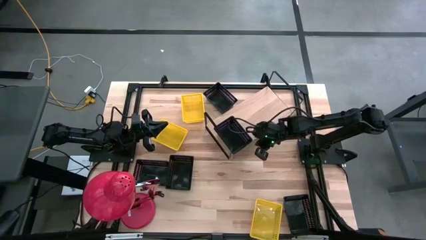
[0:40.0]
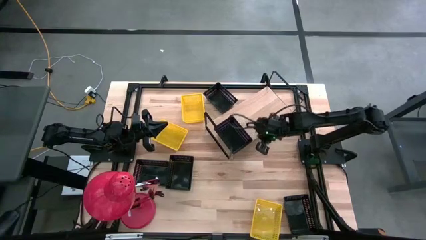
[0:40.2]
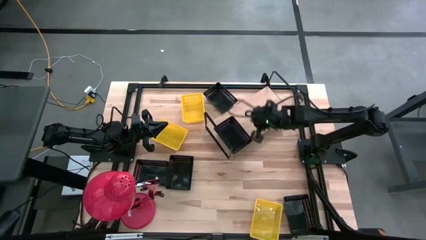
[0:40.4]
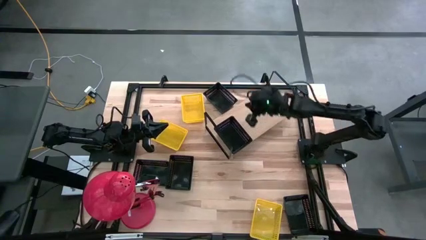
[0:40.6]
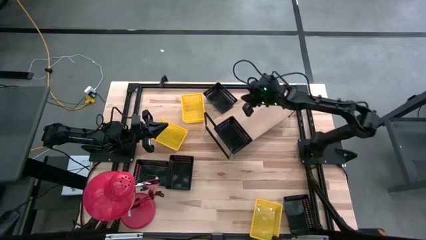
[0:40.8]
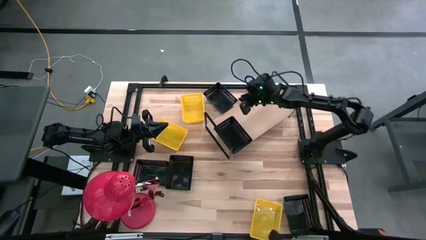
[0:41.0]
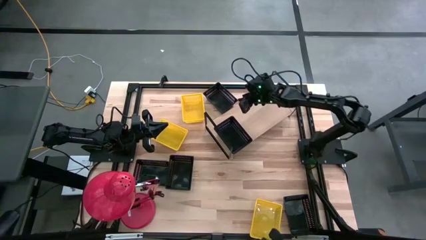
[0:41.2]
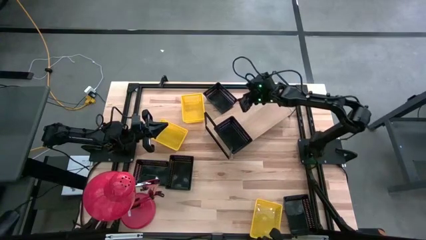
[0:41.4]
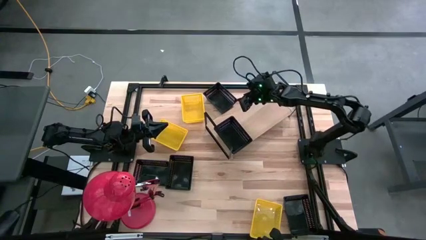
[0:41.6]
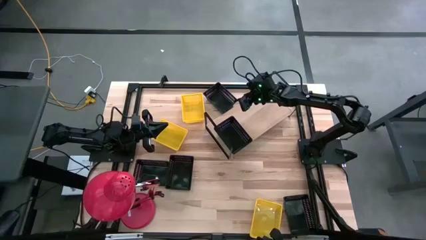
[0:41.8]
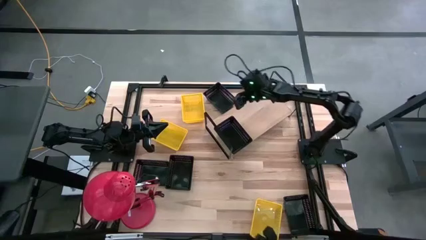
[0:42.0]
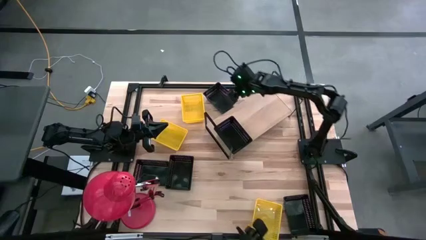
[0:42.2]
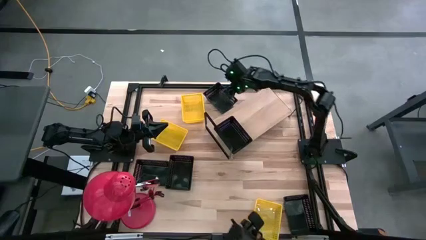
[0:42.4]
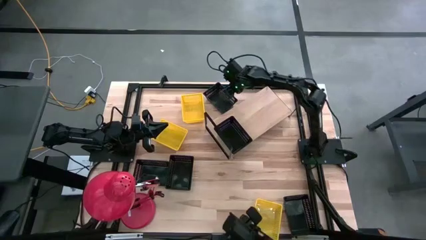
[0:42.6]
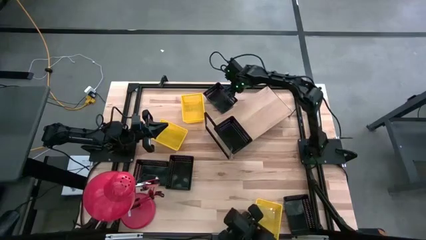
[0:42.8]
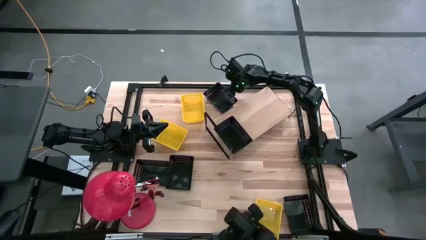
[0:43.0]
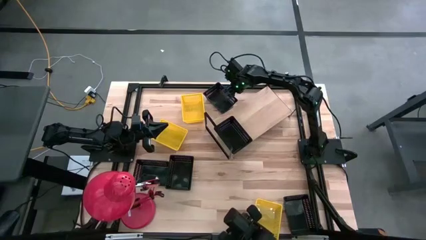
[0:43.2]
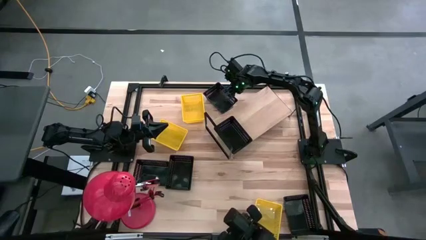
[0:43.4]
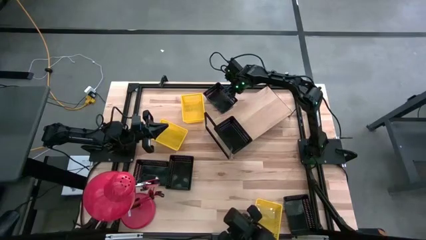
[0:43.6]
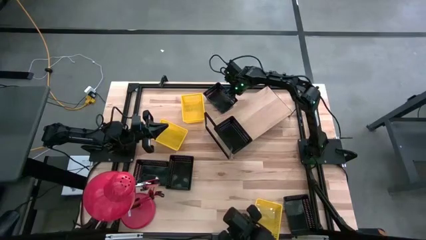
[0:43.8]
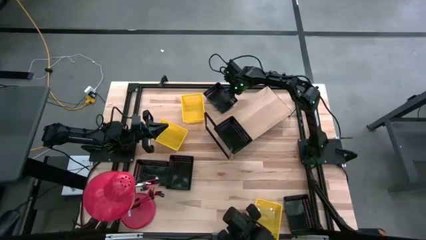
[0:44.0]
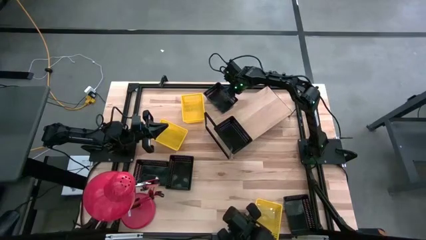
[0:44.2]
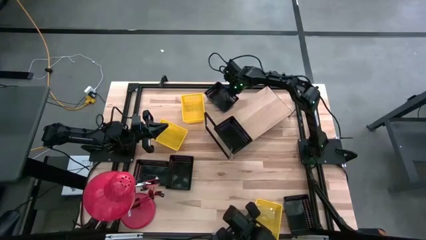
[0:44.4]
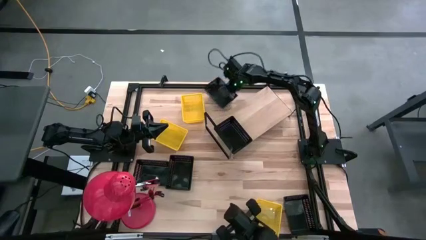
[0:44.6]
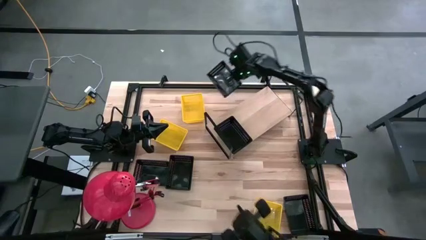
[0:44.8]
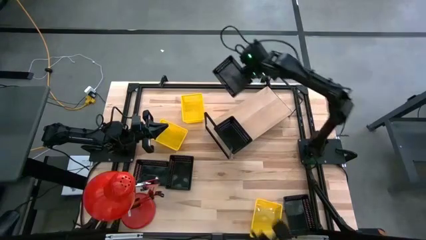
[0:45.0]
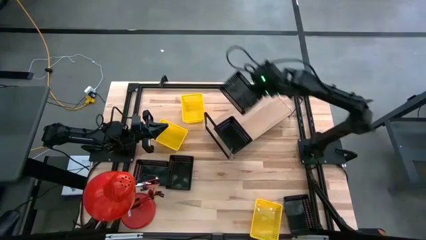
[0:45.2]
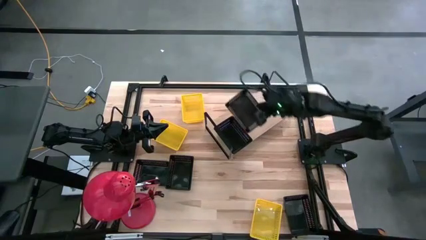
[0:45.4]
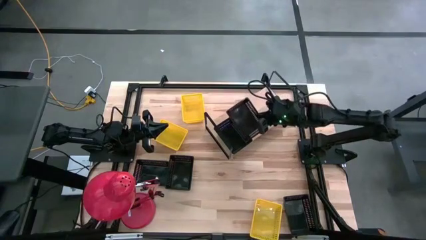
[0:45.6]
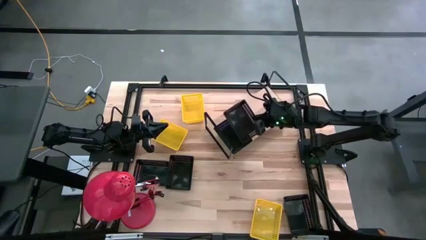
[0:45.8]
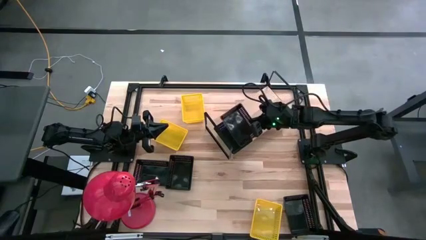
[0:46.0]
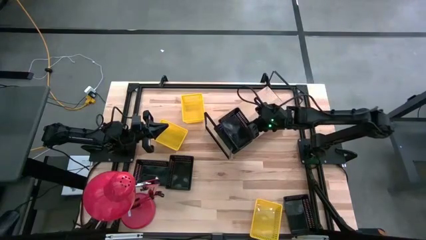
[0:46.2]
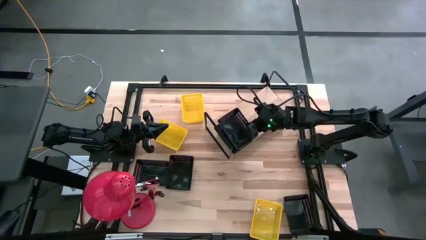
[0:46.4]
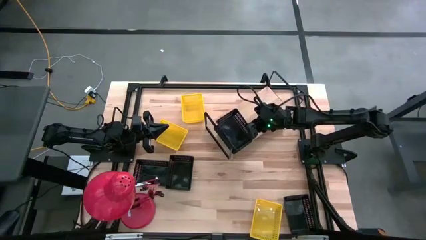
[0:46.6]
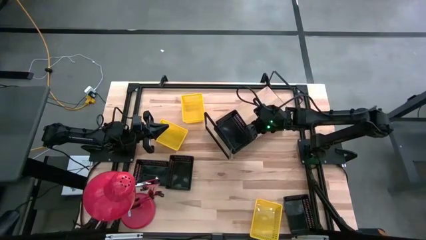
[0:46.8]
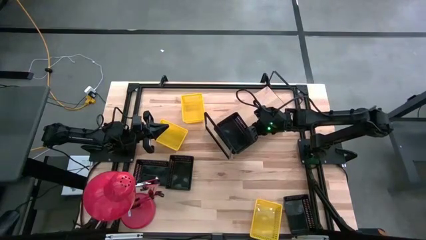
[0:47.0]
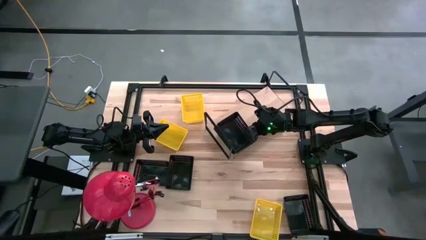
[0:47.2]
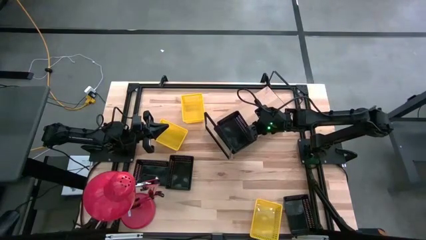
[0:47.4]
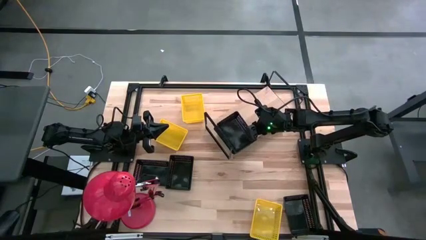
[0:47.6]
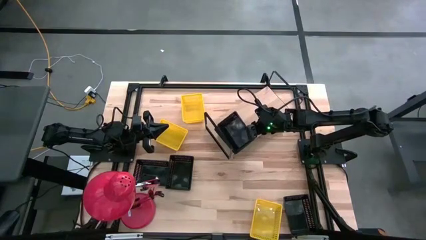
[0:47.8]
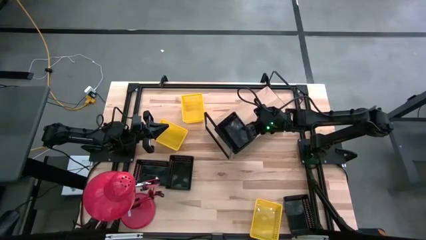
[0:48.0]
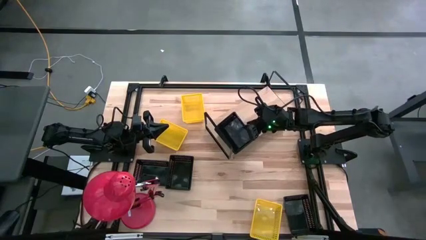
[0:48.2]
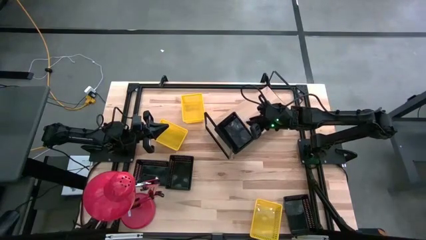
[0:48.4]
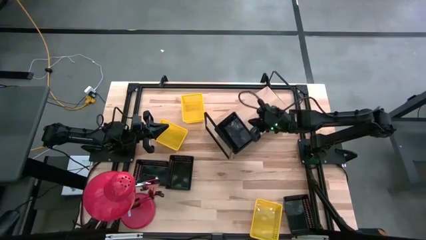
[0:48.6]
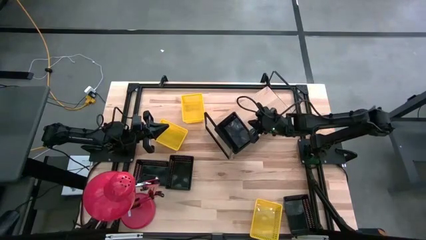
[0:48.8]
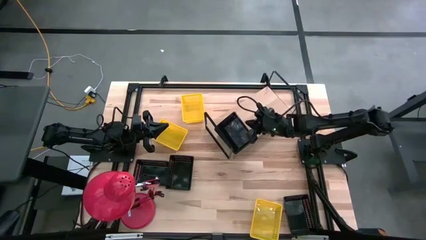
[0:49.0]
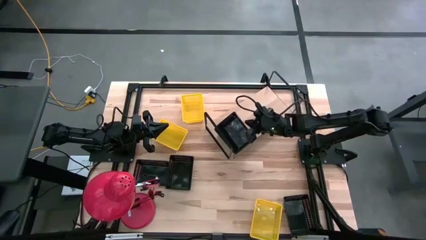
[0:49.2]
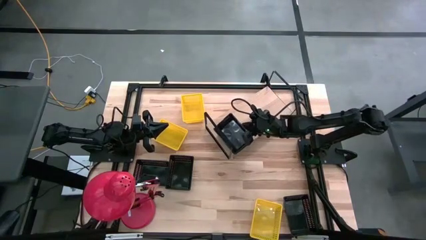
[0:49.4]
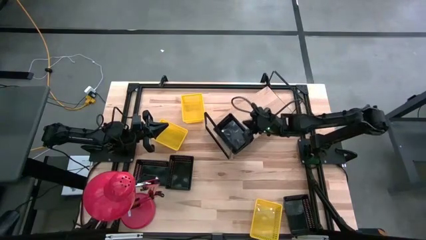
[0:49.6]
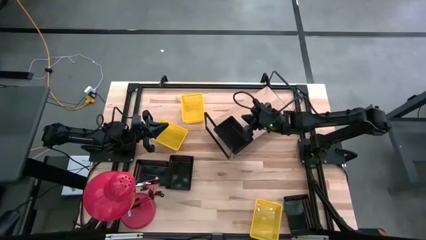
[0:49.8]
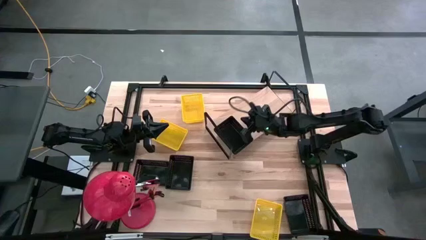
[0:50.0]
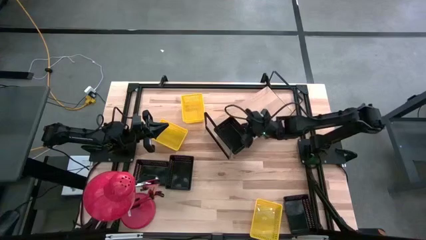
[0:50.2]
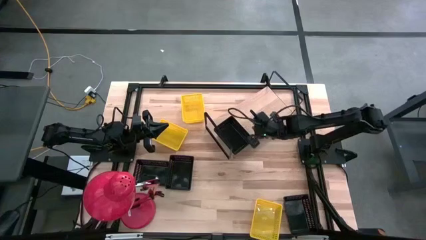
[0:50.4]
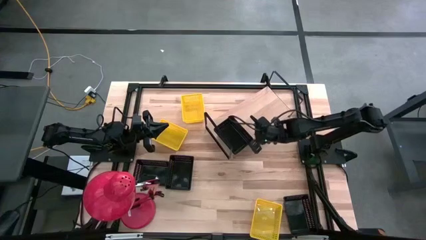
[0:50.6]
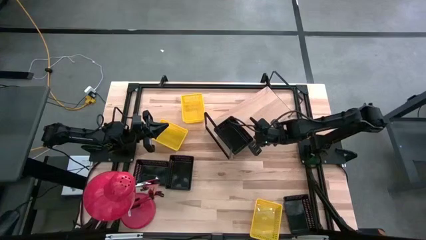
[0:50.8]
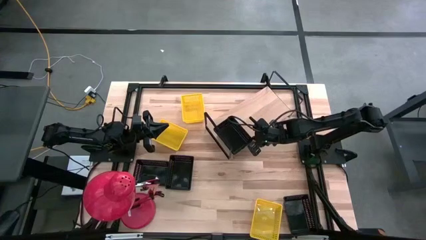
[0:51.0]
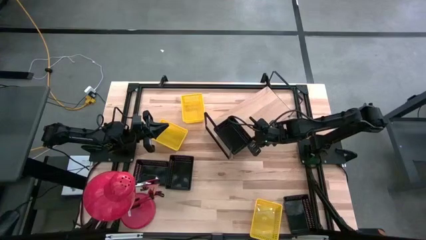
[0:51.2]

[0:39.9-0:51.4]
Task: Stack baskets on shelf by color
Stack the black bin on top of the black bin on the shelf

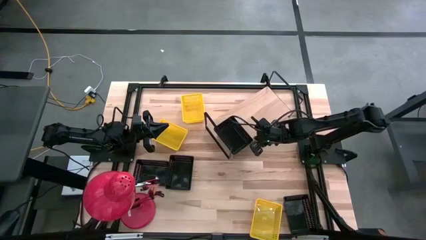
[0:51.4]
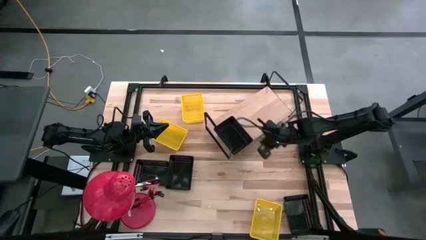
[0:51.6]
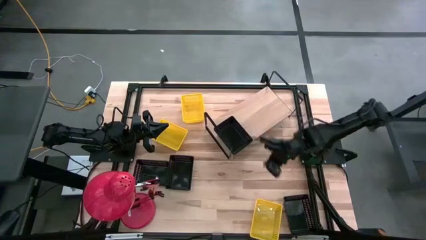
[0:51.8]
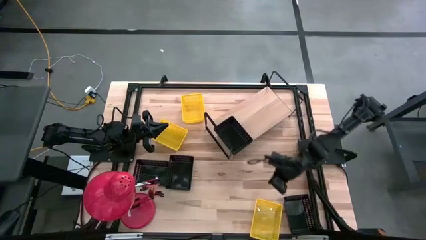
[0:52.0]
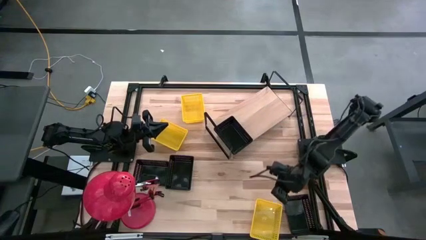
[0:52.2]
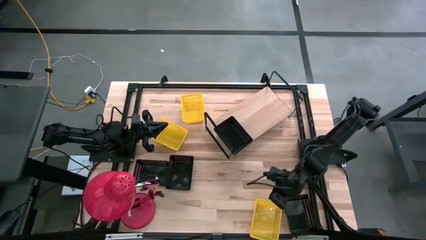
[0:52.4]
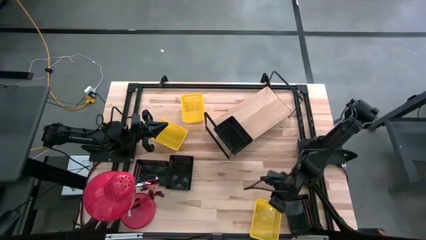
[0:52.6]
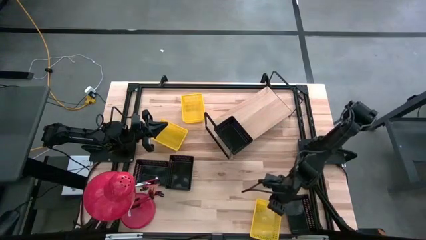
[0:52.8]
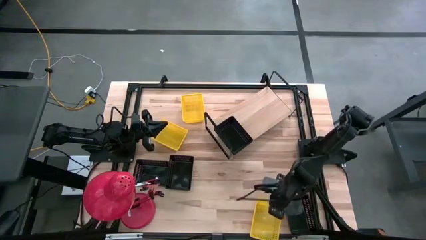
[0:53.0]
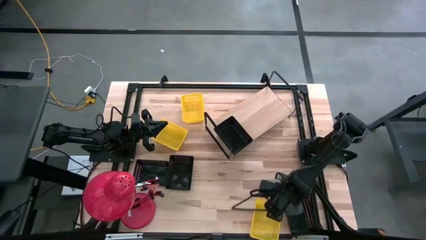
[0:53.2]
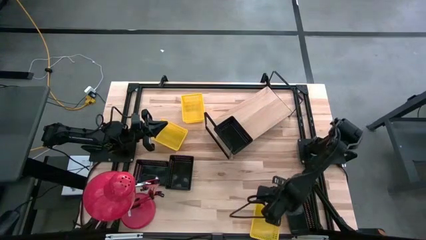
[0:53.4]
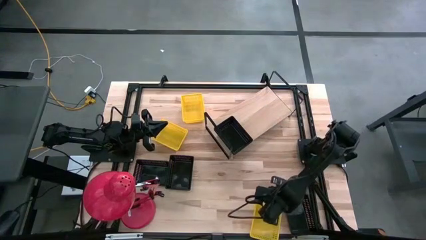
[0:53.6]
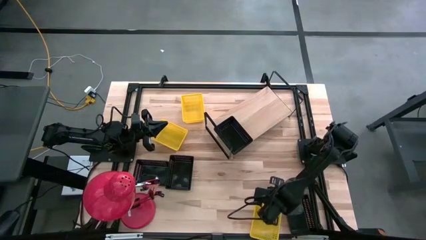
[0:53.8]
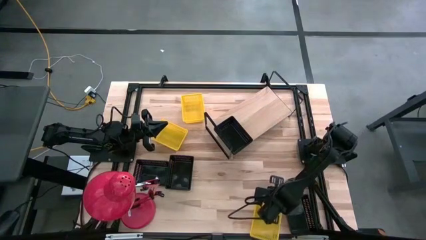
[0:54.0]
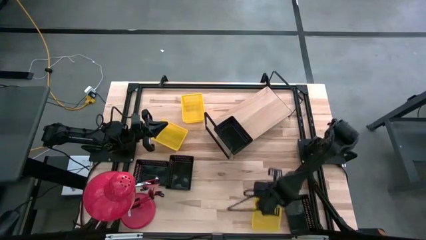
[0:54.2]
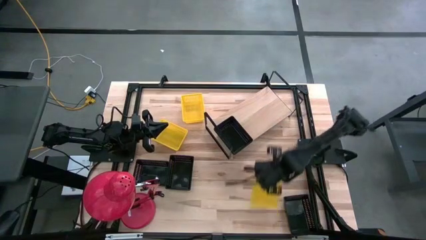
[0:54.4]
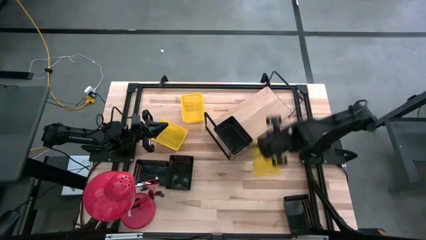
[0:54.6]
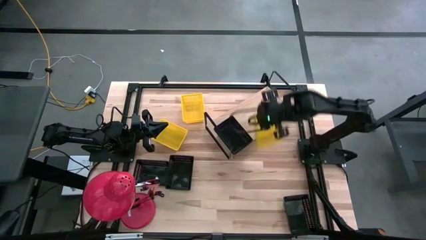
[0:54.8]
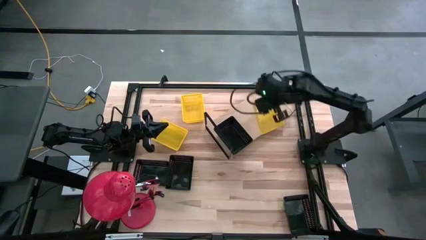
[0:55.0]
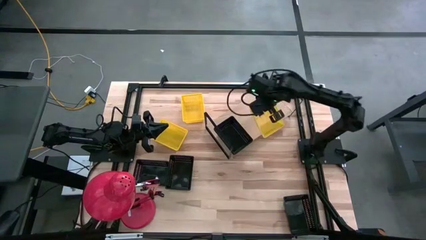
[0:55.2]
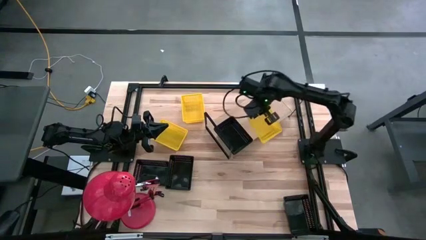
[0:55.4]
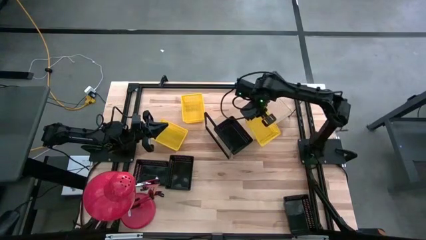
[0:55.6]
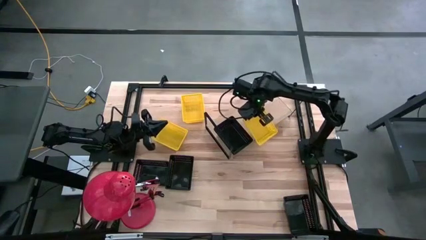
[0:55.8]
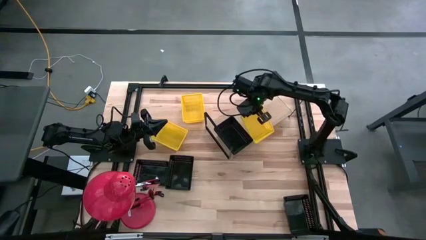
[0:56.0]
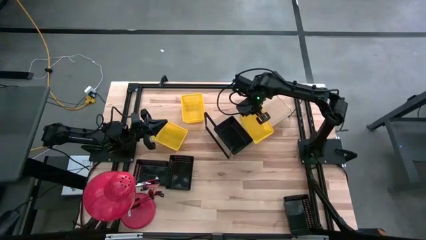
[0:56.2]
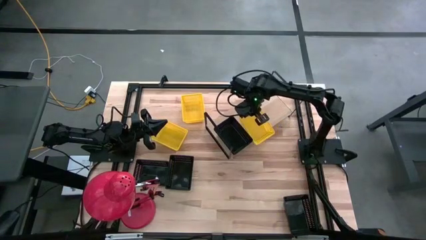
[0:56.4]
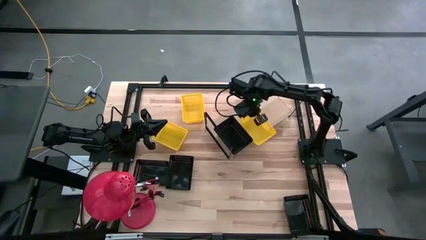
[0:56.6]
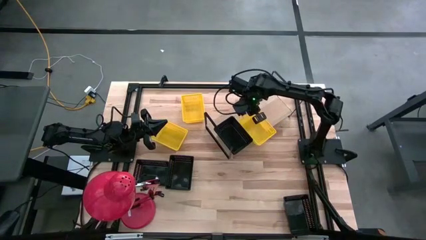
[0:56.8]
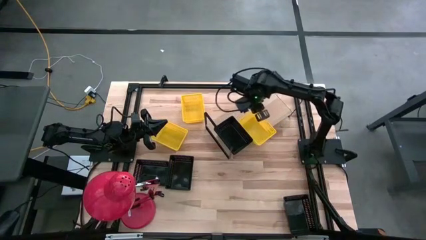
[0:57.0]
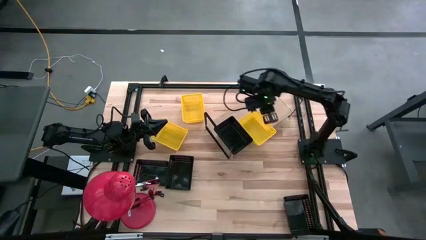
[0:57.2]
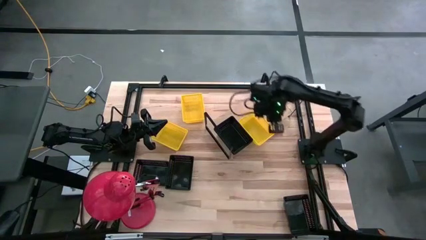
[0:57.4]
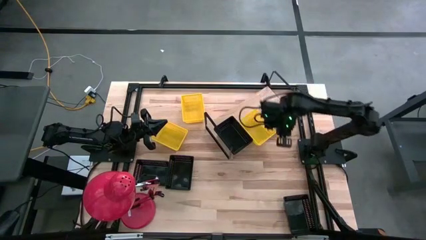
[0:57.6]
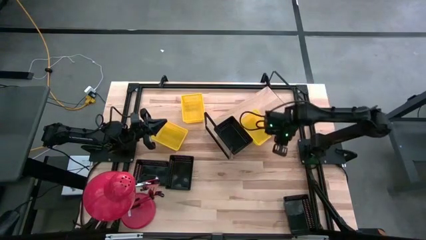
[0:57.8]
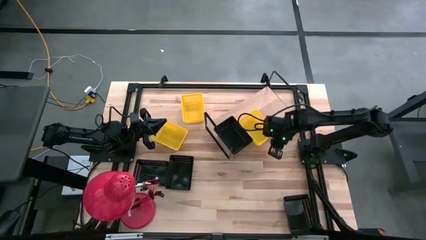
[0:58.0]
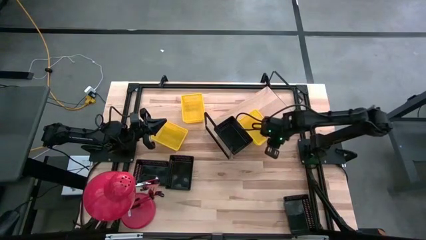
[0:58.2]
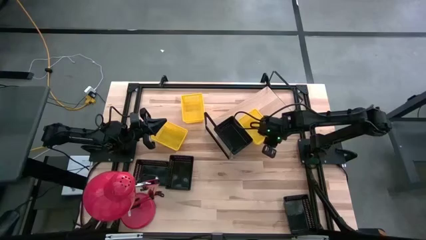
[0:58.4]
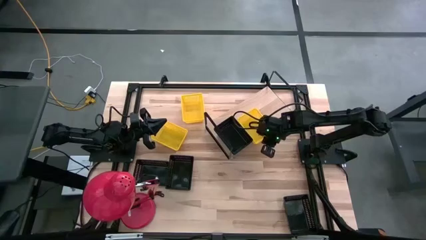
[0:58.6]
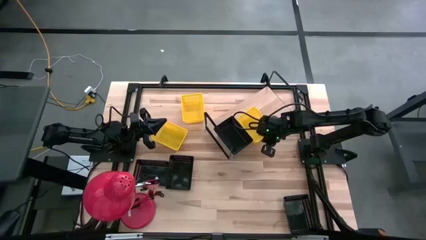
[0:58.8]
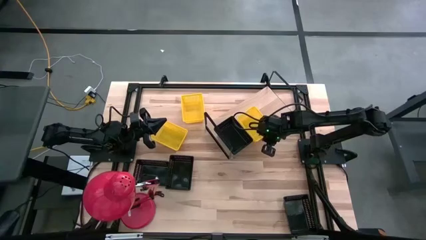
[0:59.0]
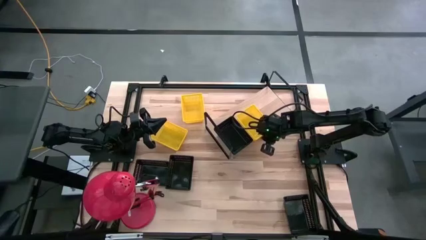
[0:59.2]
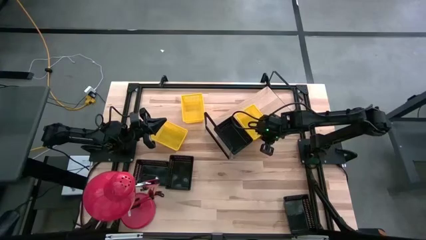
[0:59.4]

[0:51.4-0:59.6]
Put the right yellow bin on the shelf
